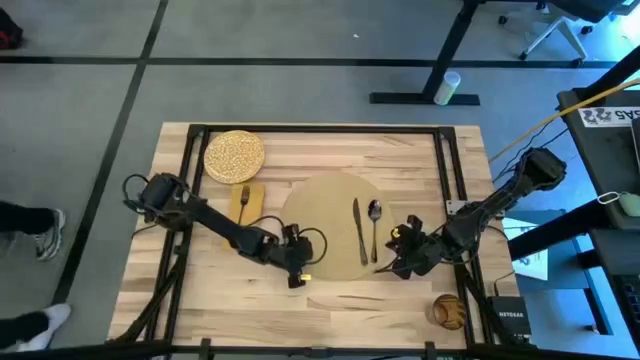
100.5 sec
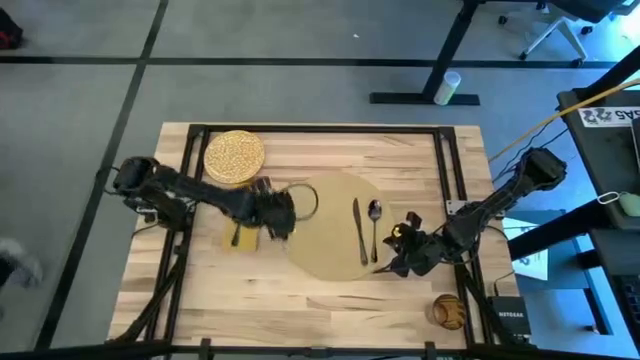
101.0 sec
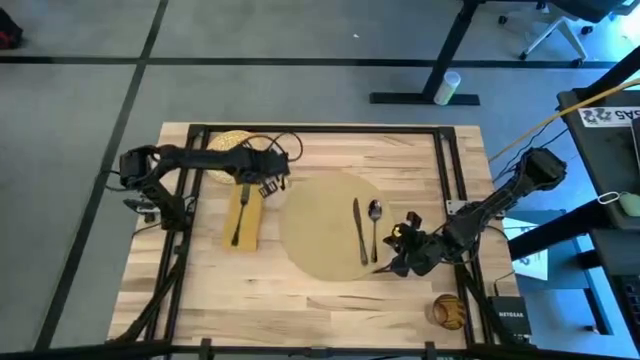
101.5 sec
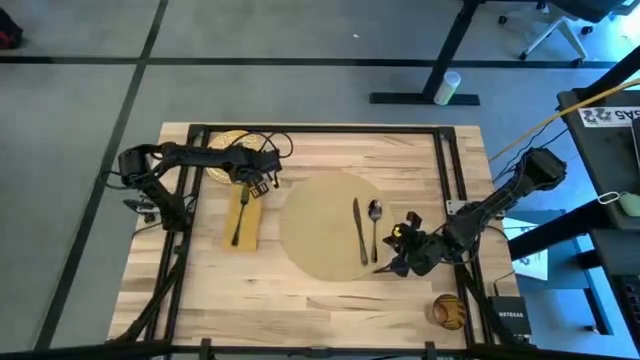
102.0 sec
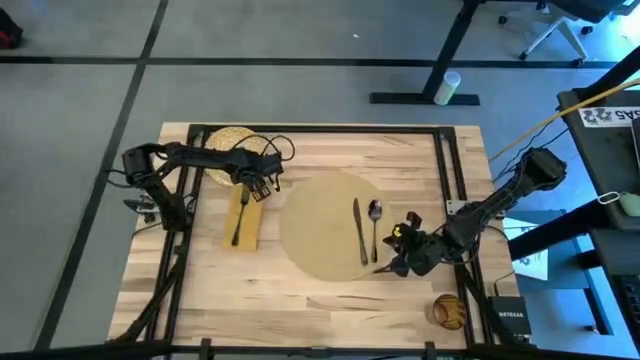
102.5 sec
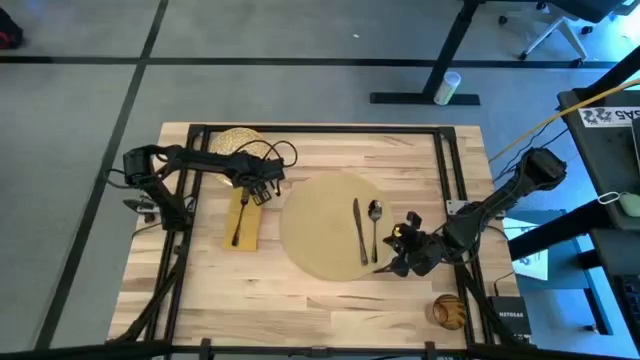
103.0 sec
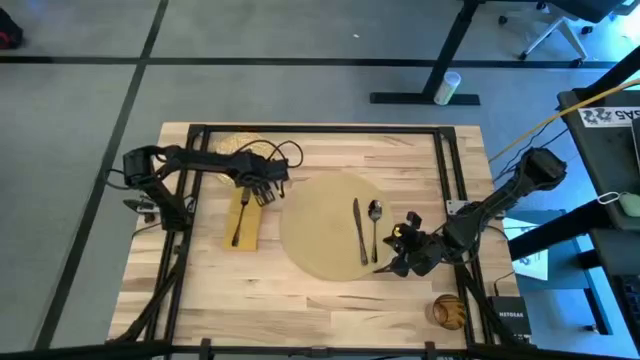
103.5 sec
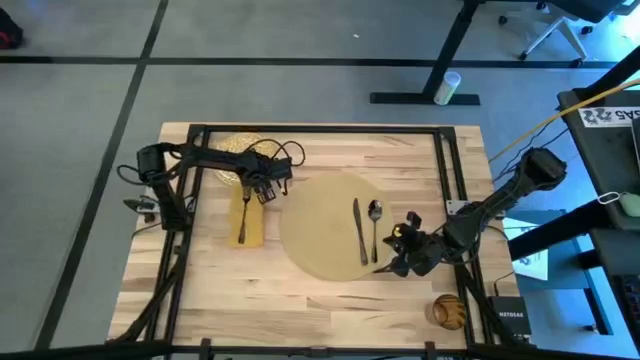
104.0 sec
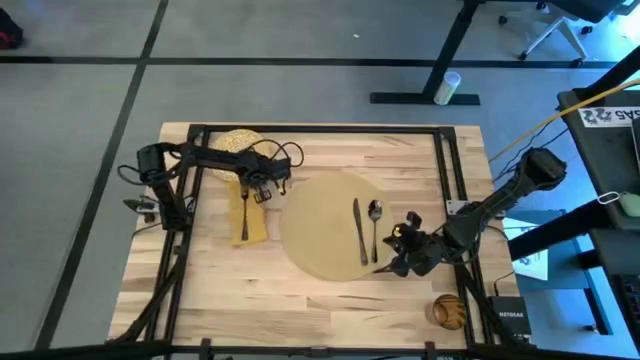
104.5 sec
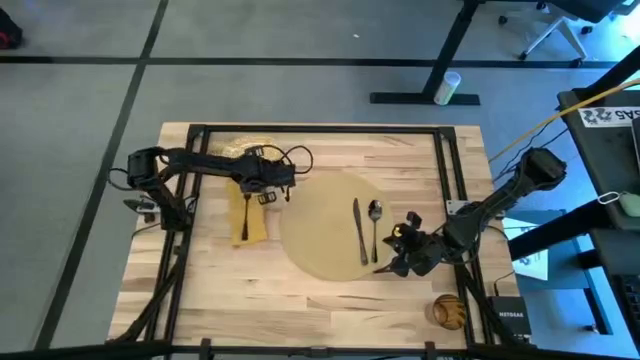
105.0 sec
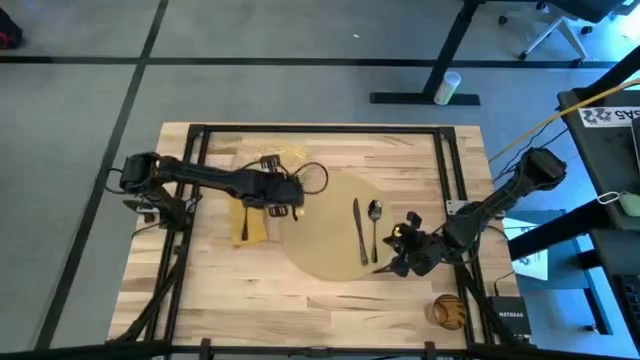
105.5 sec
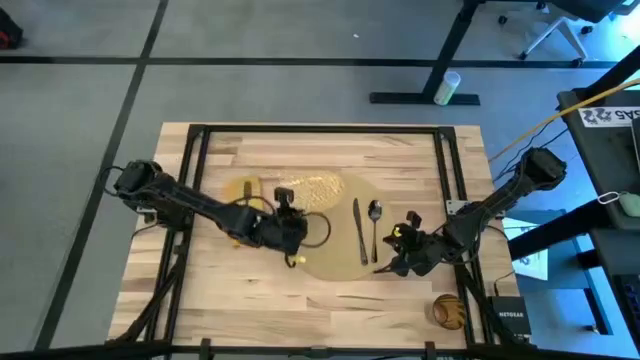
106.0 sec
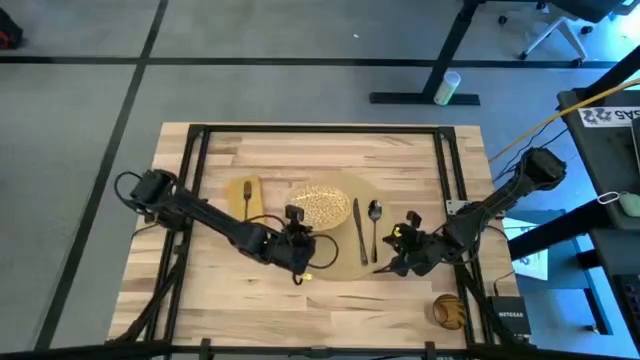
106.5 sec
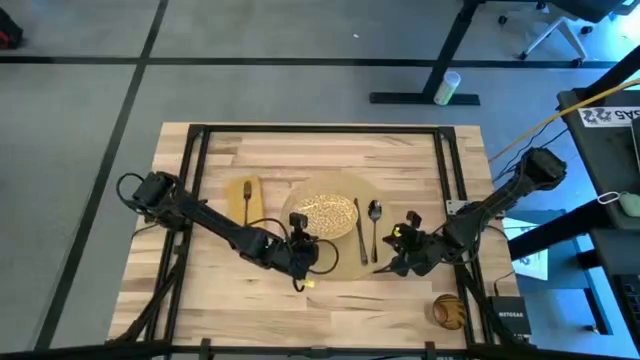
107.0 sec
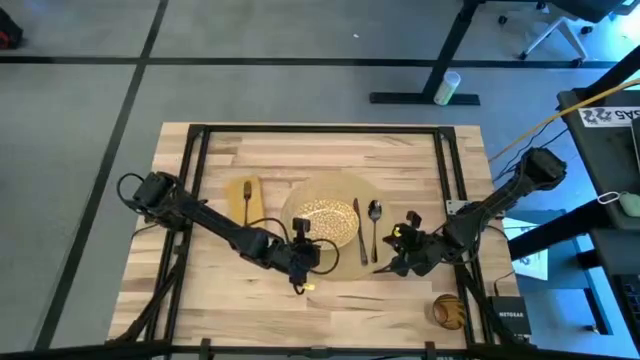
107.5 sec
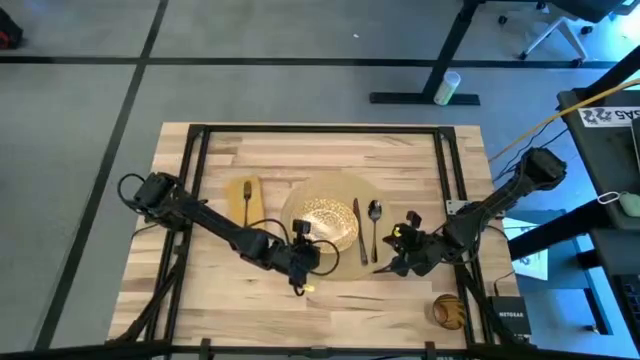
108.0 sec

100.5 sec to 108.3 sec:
Task: Set table place
Put the yellow patterned plate on the woven mat

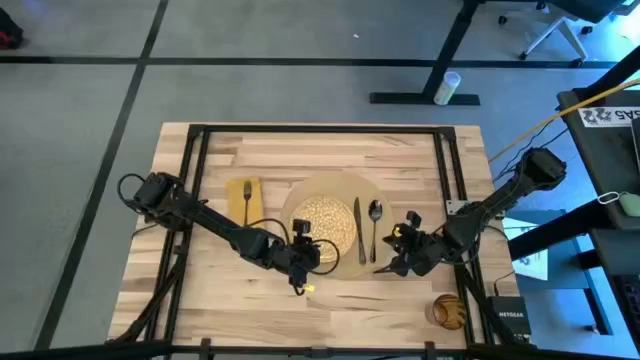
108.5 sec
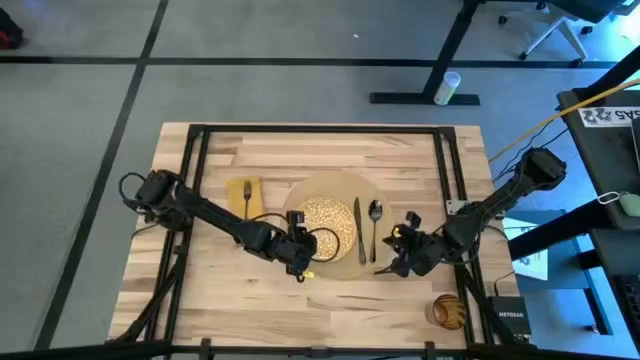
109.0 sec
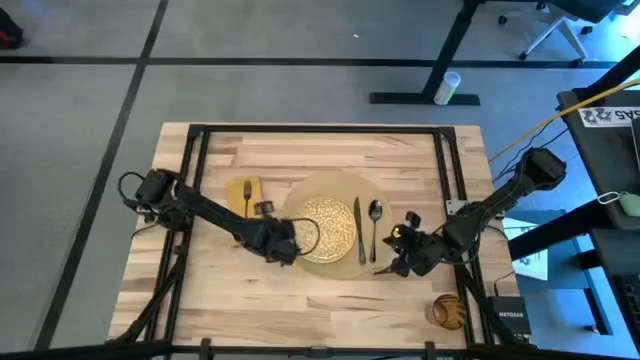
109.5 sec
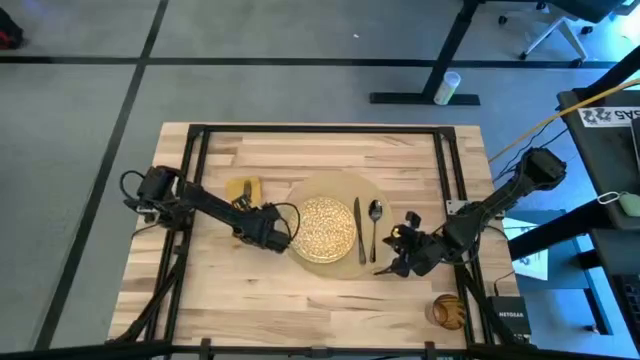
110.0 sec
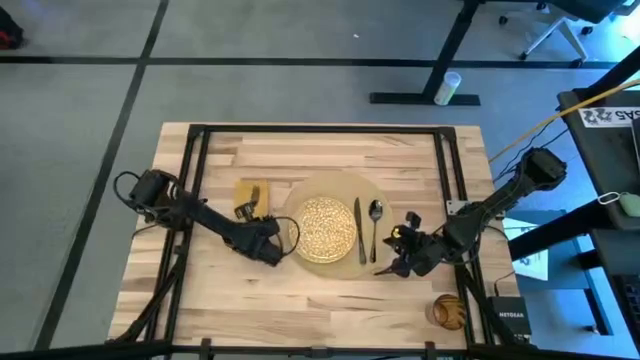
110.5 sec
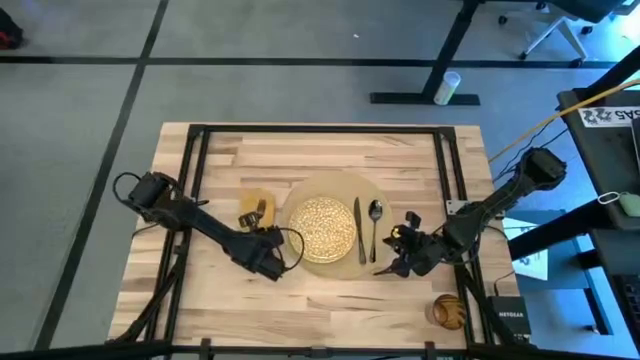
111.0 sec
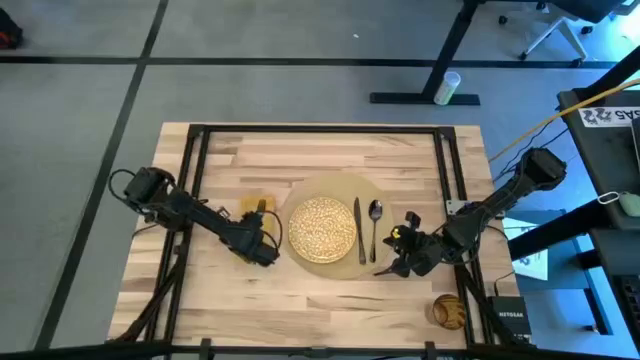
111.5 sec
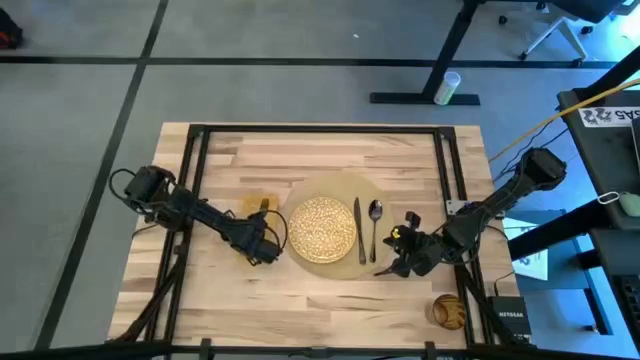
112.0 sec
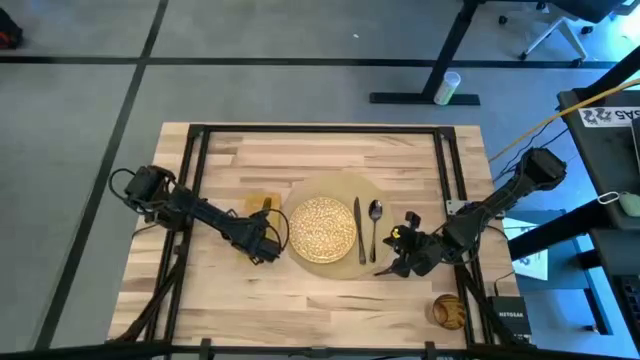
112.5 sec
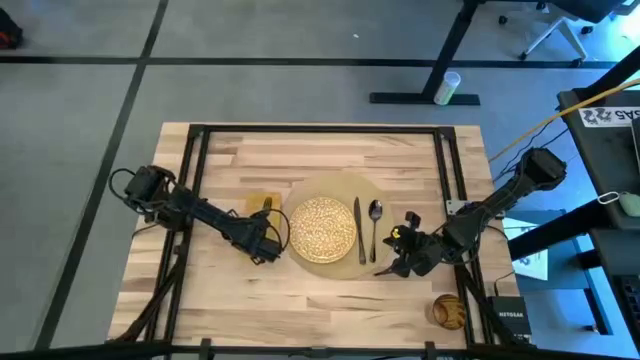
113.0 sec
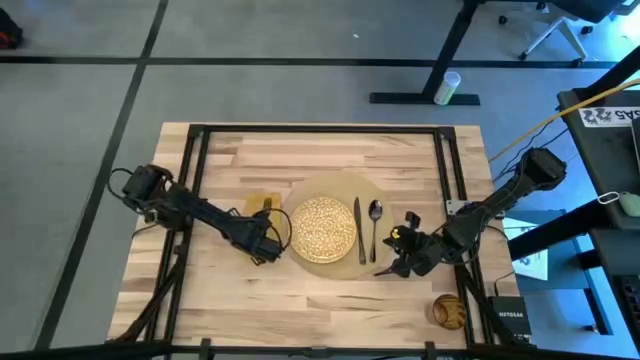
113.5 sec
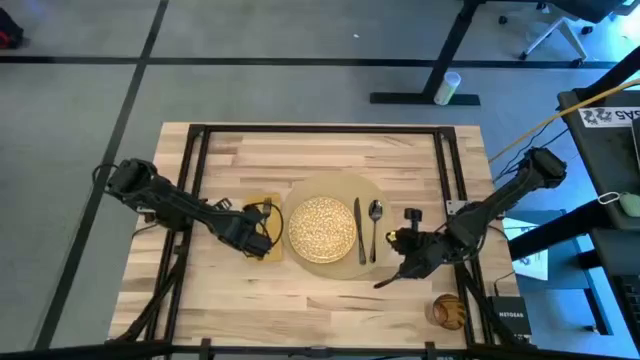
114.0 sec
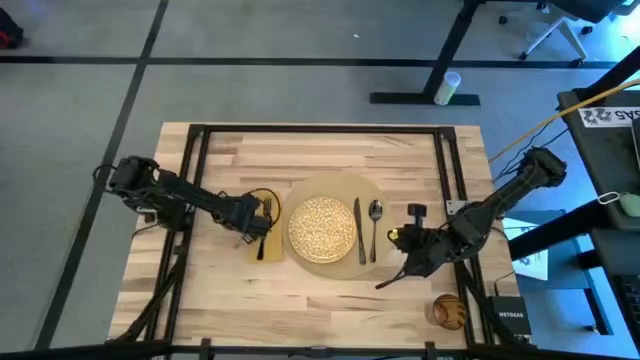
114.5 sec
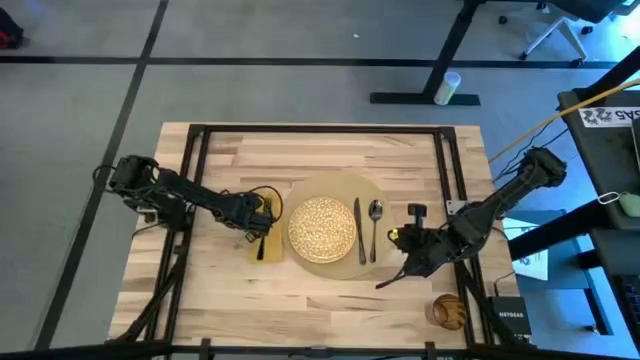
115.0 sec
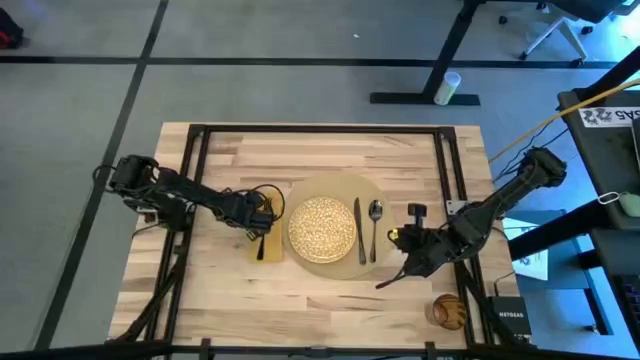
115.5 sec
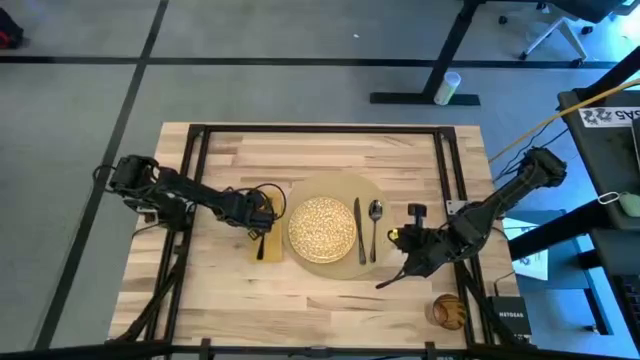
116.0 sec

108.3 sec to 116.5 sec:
Adjust the yellow napkin

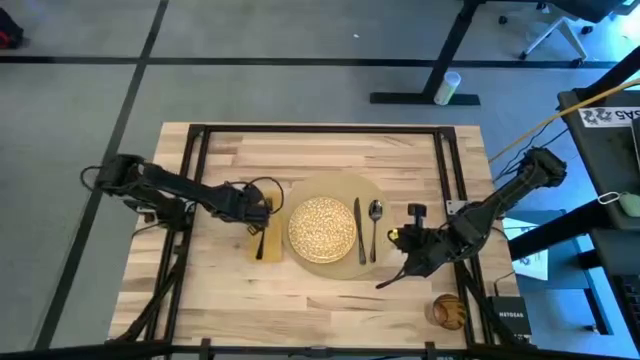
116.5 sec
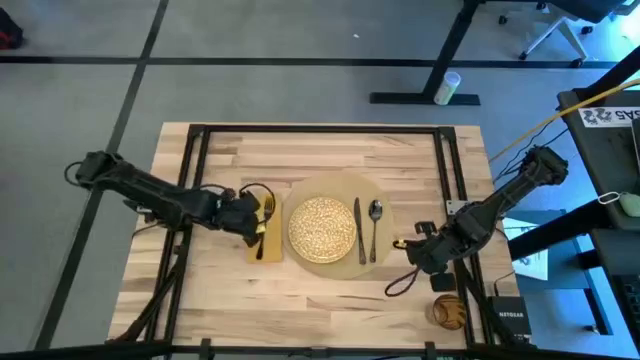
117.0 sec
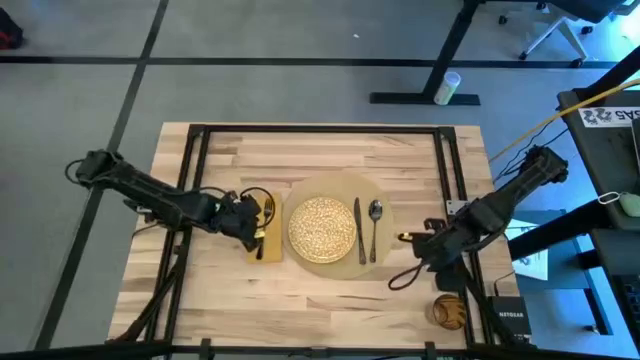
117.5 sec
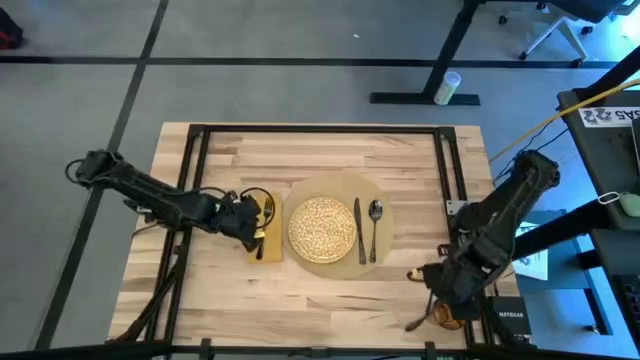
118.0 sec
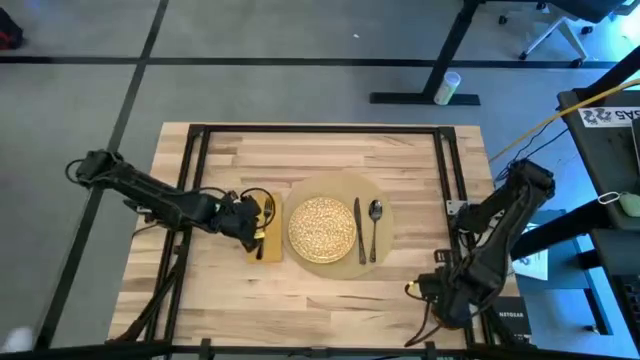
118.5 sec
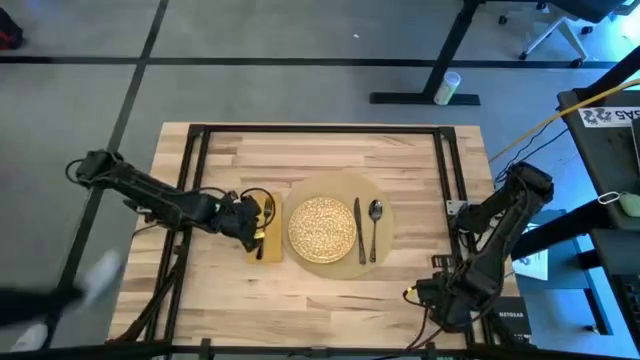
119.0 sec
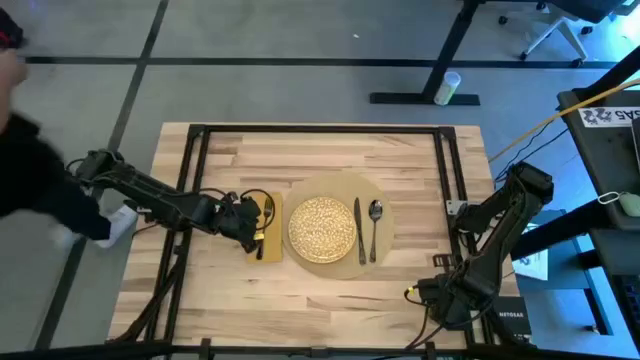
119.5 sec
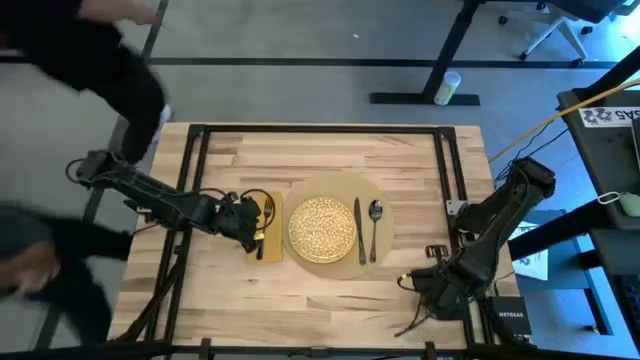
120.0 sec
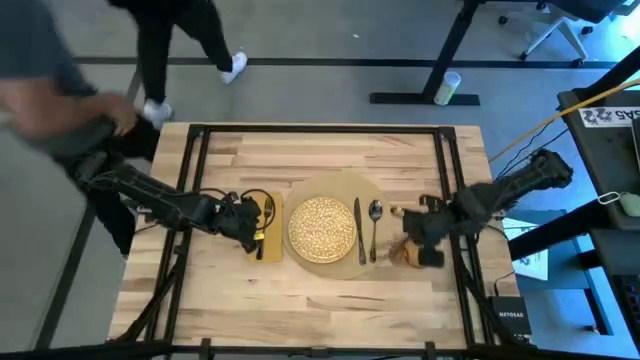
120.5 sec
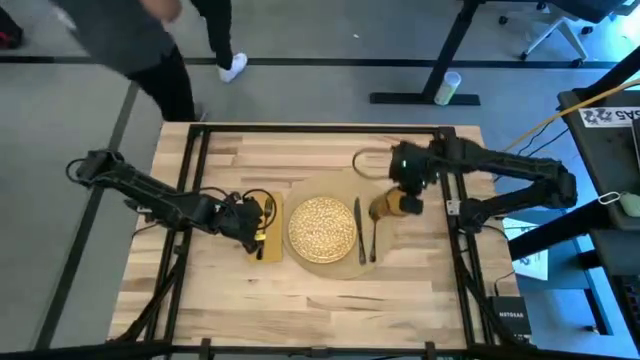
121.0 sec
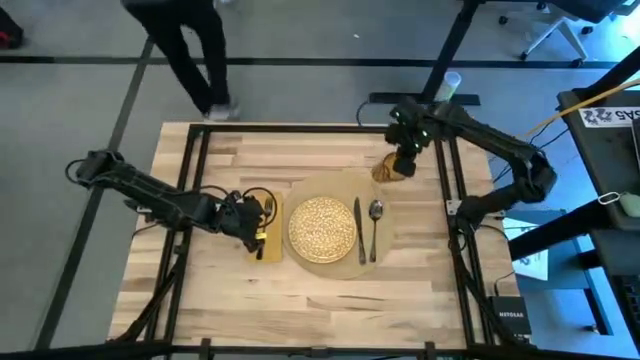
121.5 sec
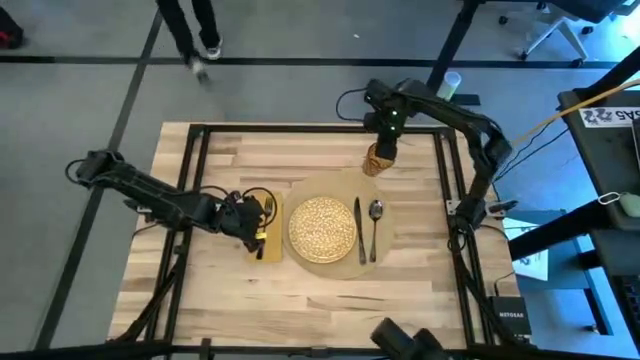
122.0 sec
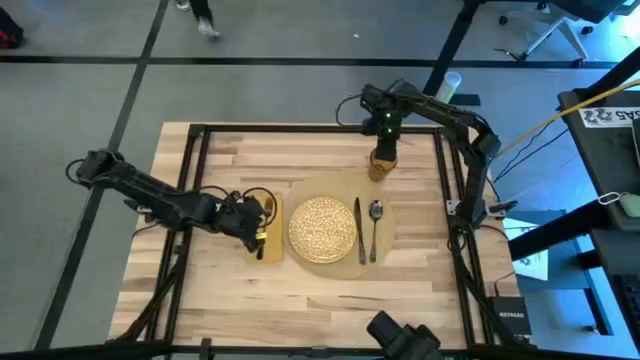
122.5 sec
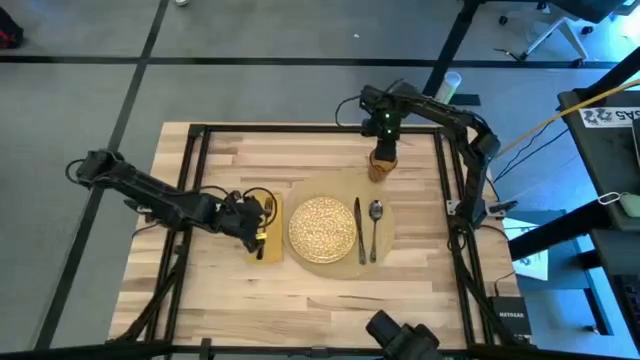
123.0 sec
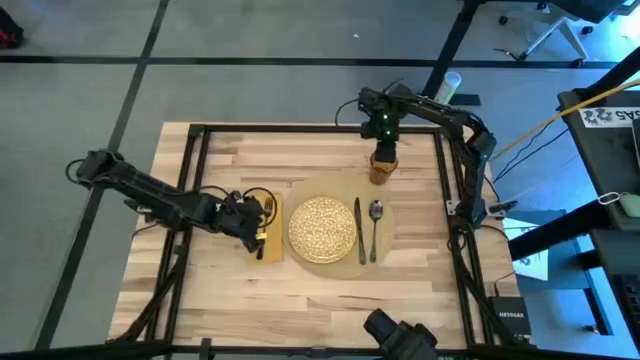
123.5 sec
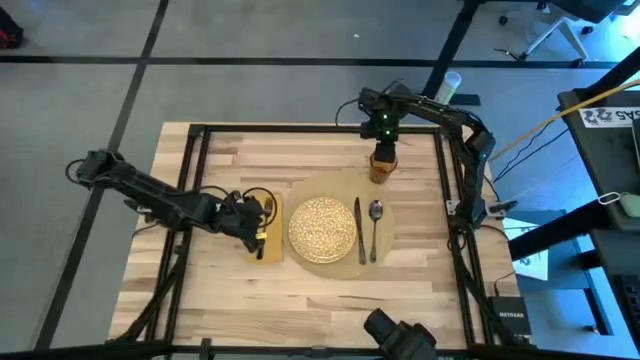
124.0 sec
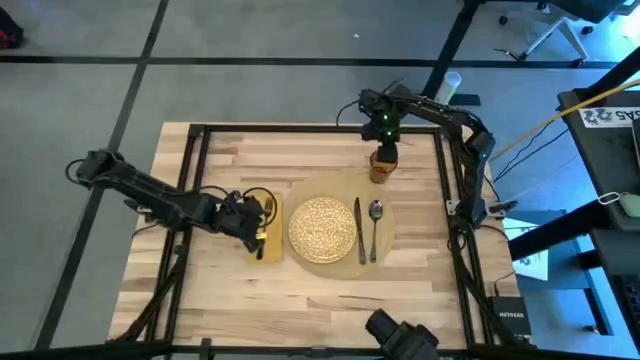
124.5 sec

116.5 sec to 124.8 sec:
Put the brown cup to the top right of the woven mat
